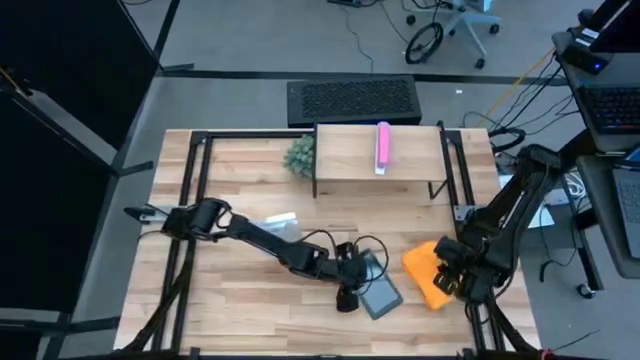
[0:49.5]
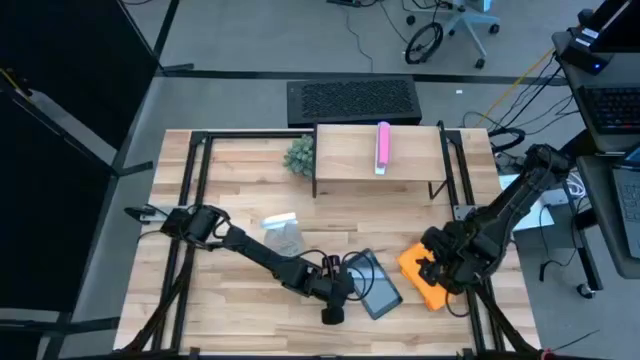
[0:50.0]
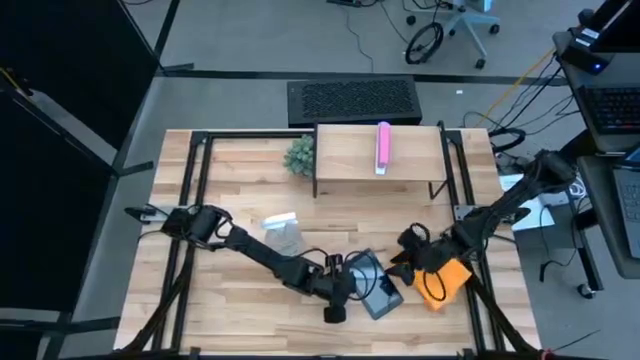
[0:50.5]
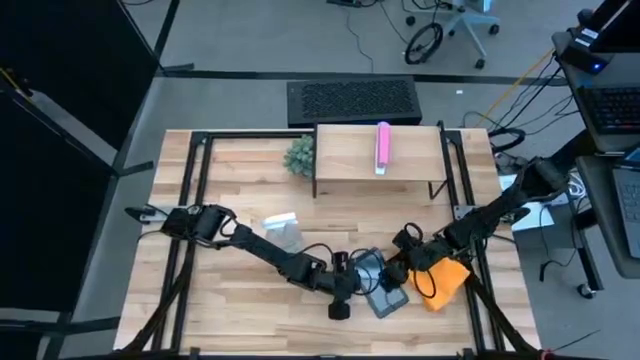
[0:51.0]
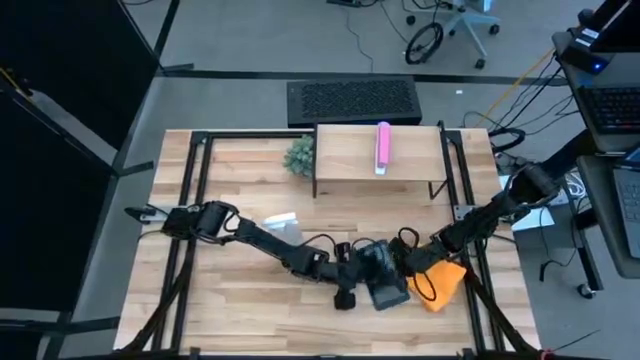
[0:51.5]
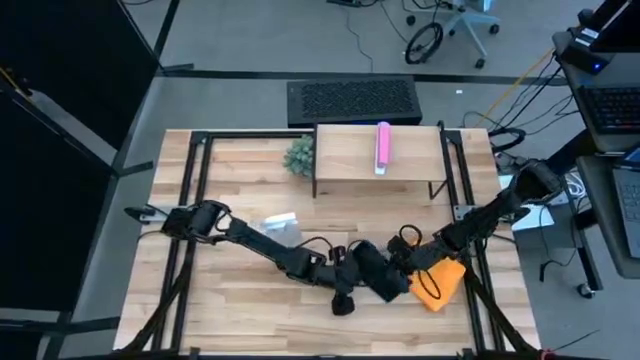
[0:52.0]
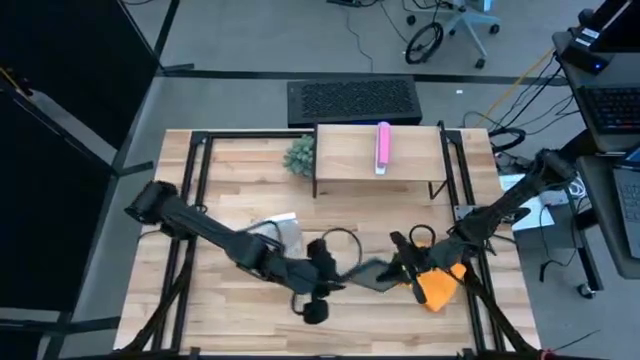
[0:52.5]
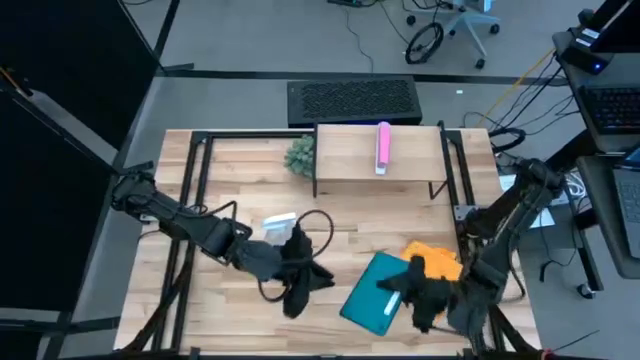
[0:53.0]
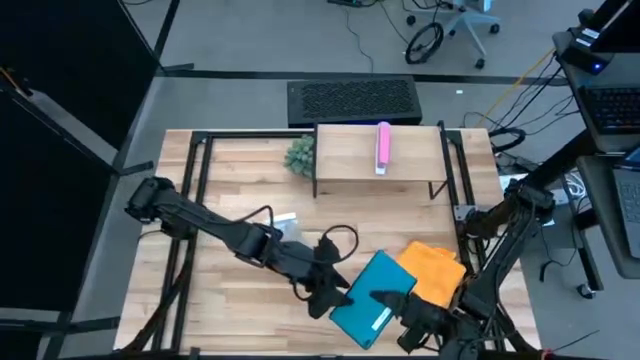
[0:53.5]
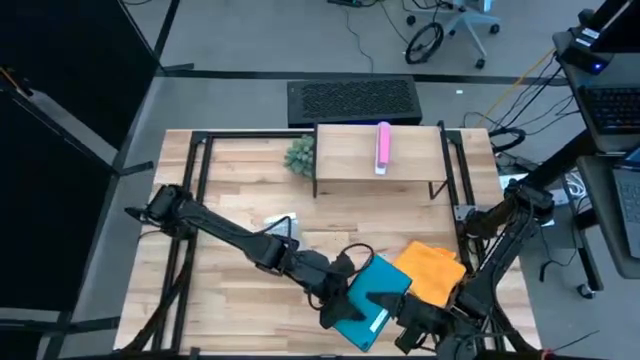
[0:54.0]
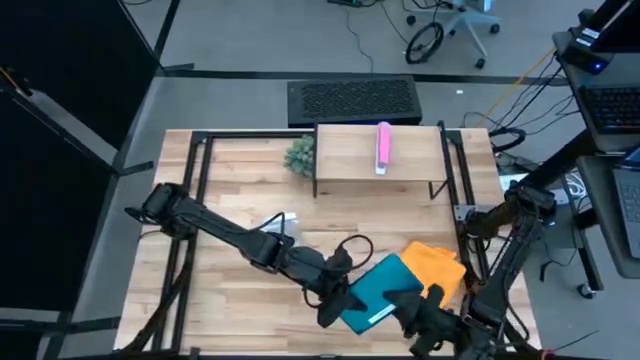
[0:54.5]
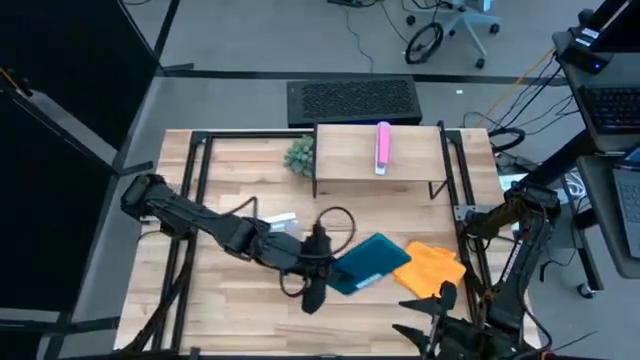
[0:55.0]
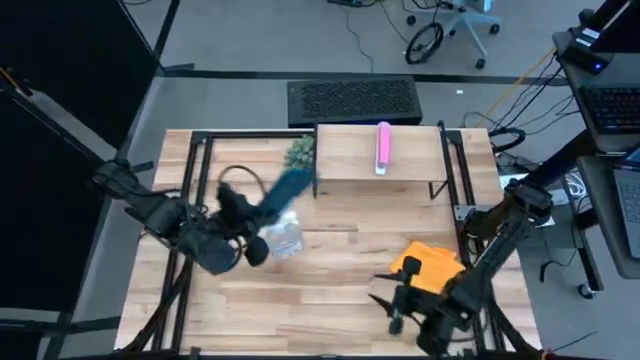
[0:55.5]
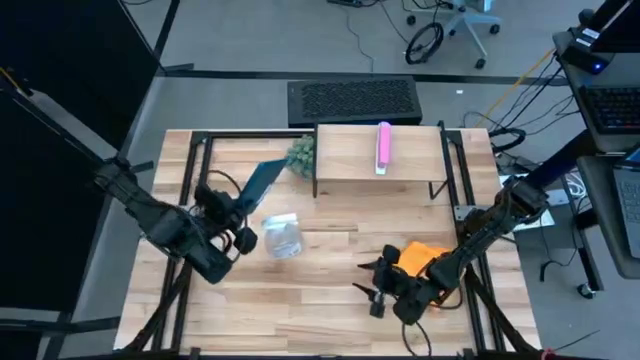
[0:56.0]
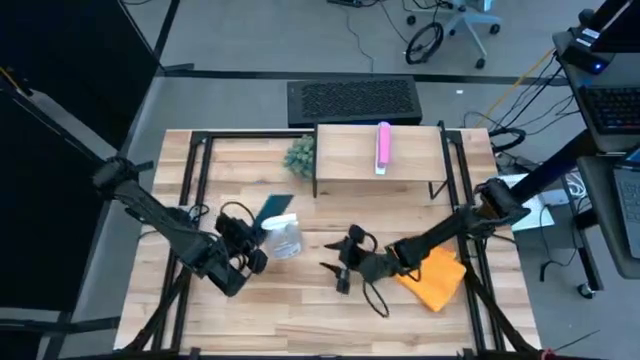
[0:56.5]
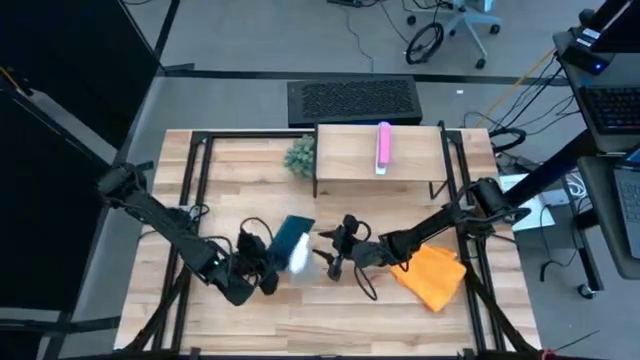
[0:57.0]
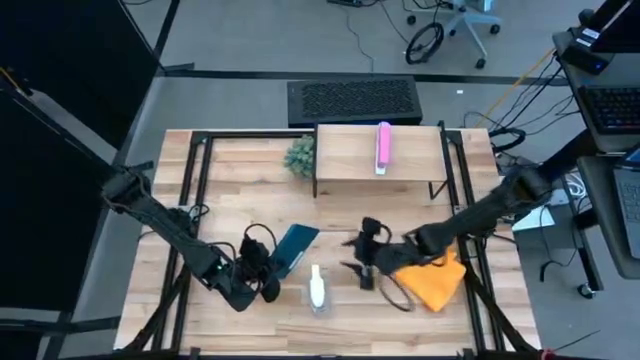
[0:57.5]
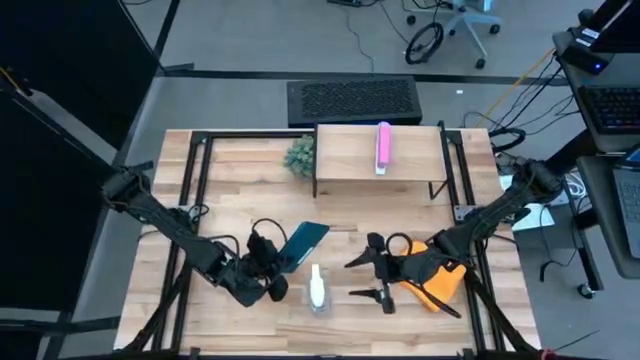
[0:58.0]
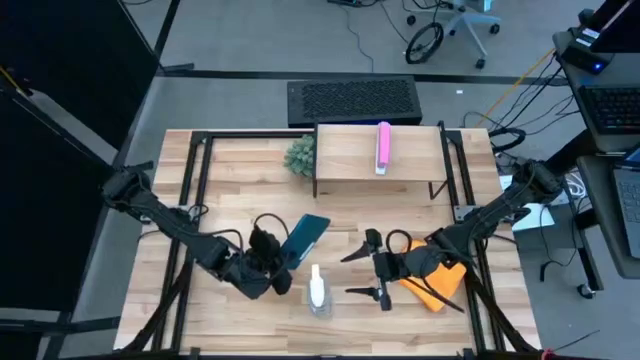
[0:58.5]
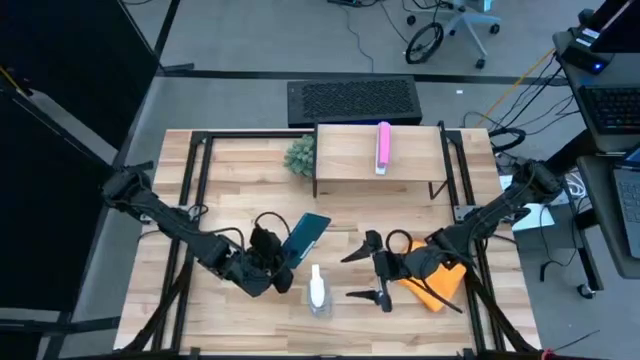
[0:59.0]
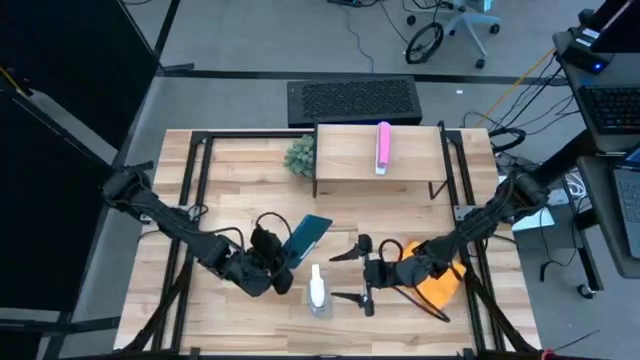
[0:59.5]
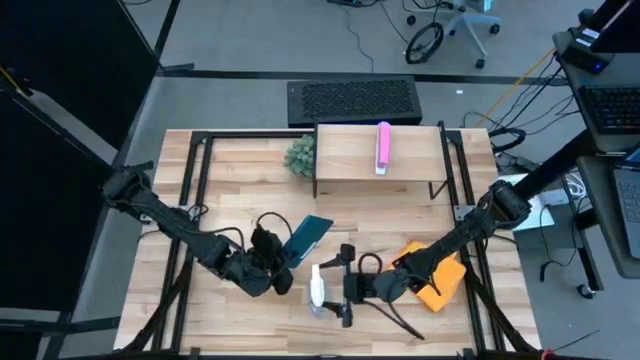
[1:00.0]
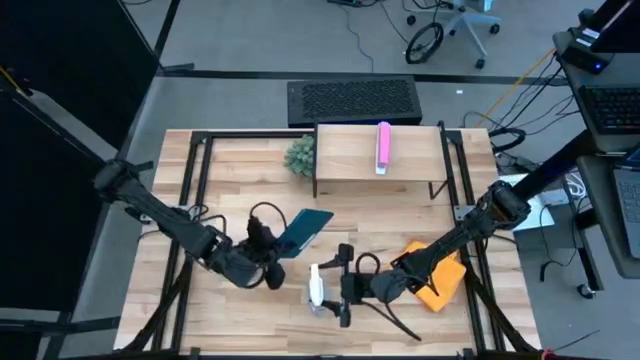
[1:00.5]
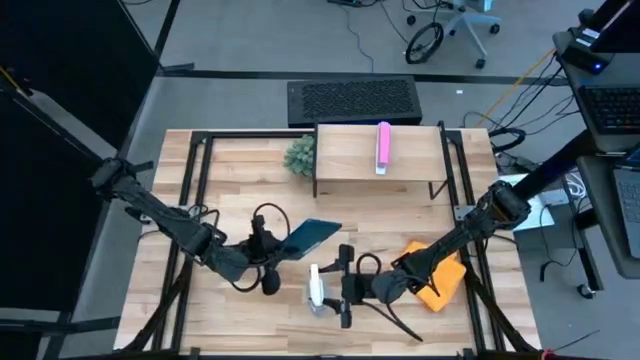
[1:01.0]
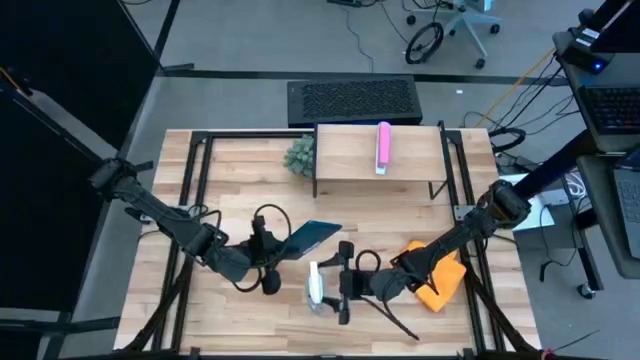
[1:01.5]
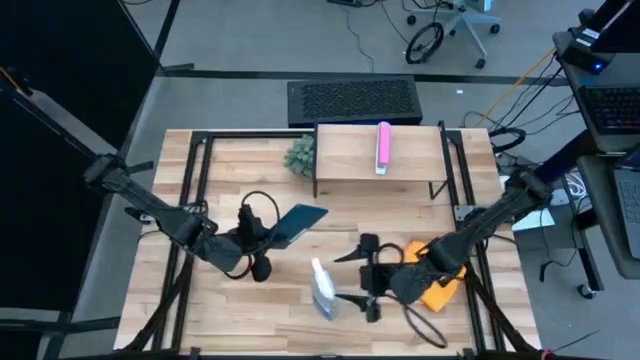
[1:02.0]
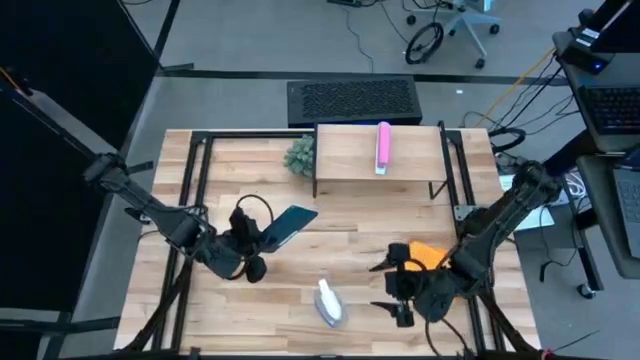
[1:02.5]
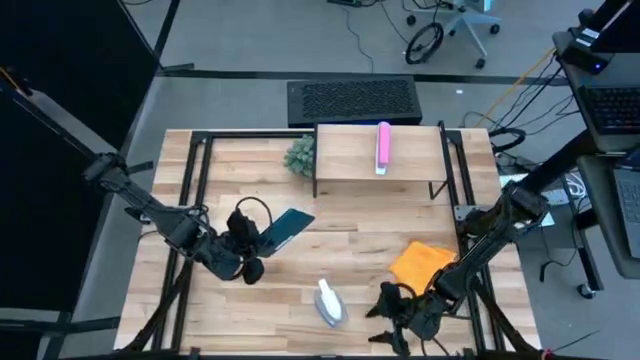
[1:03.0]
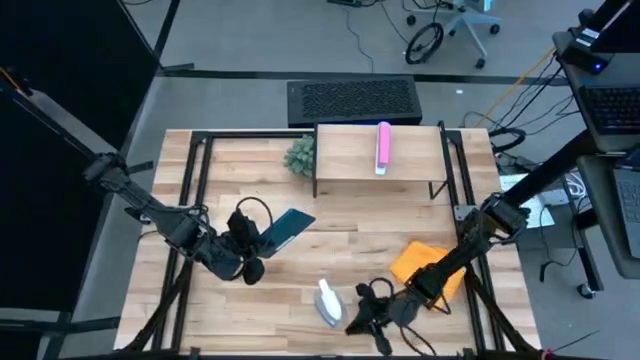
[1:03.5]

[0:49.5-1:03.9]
Task: Apply microfiber cloth
Spray the tablet with the bottle cleaner

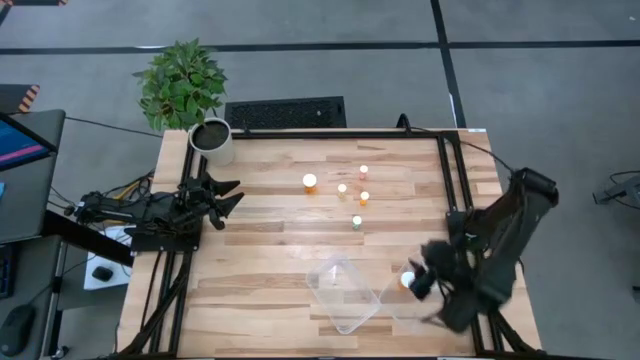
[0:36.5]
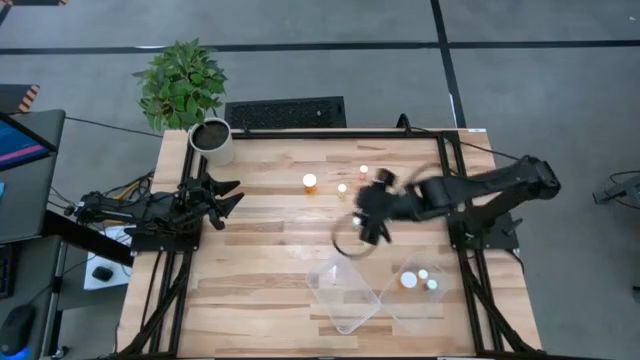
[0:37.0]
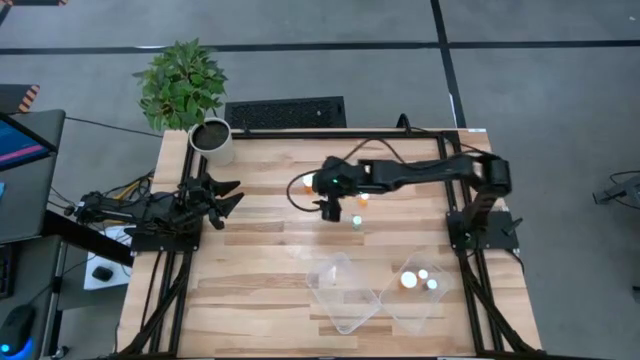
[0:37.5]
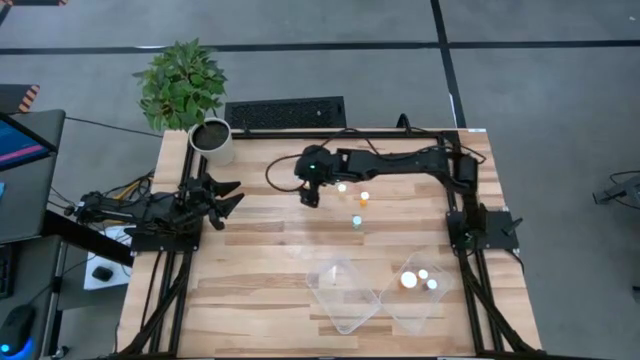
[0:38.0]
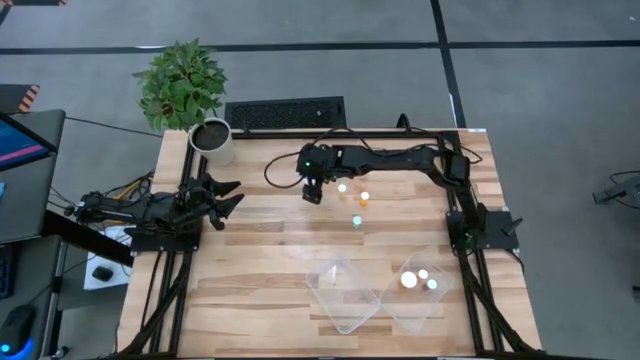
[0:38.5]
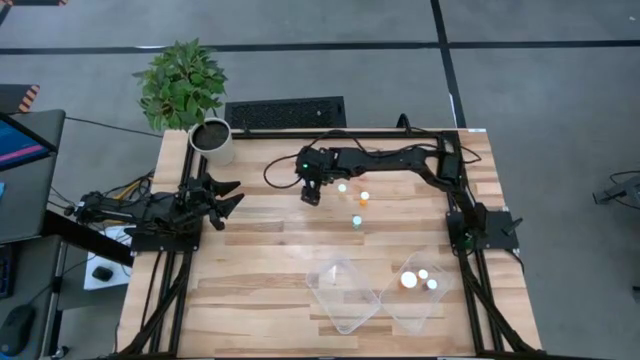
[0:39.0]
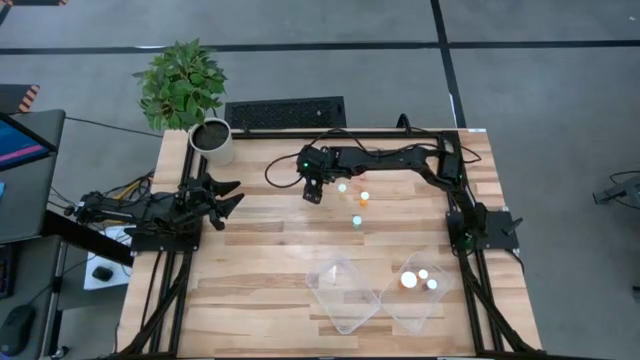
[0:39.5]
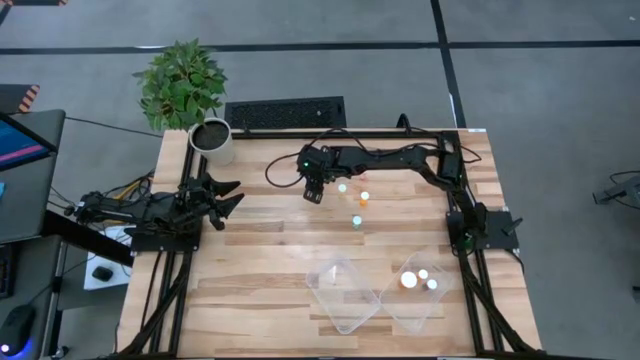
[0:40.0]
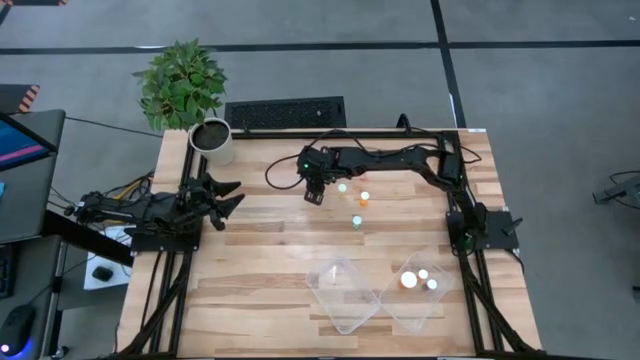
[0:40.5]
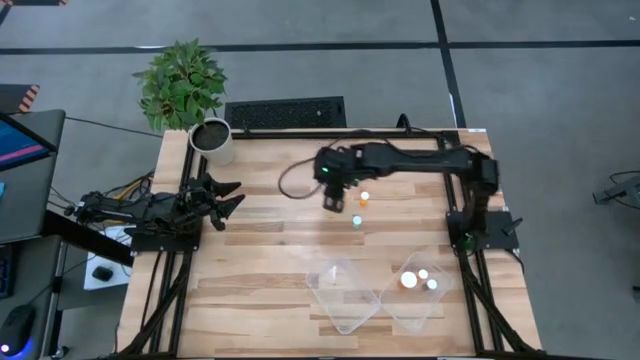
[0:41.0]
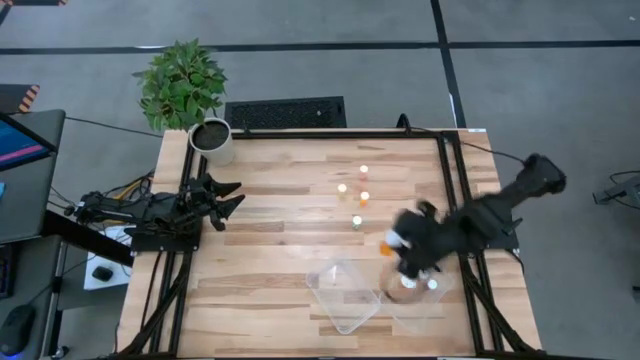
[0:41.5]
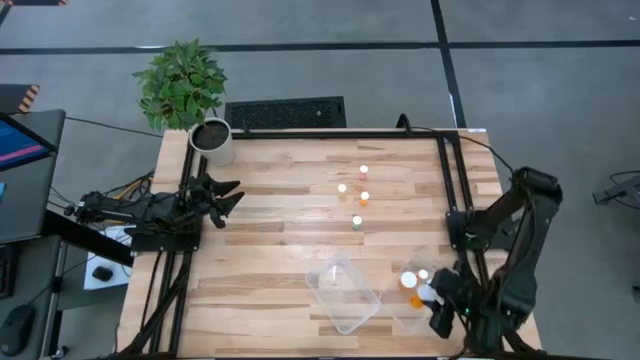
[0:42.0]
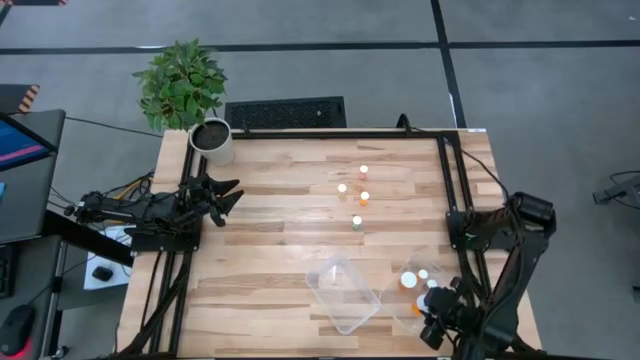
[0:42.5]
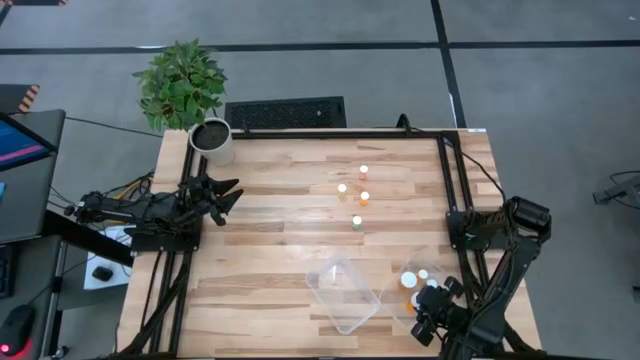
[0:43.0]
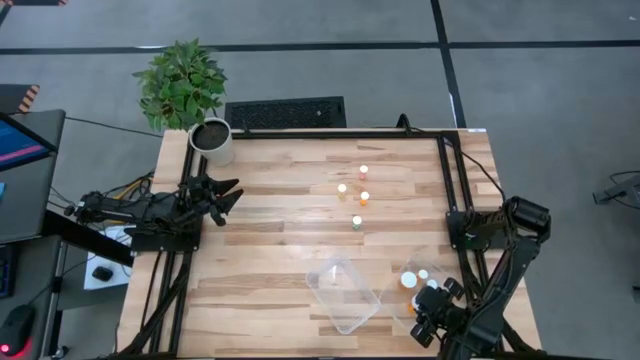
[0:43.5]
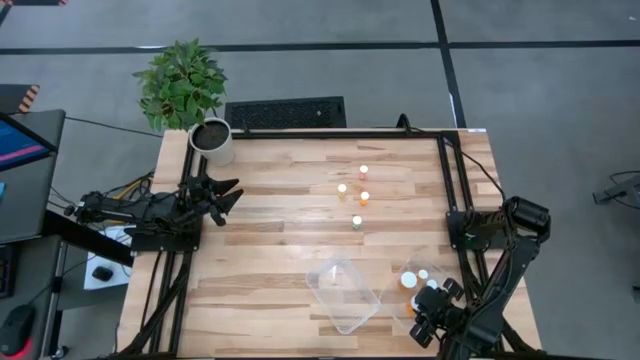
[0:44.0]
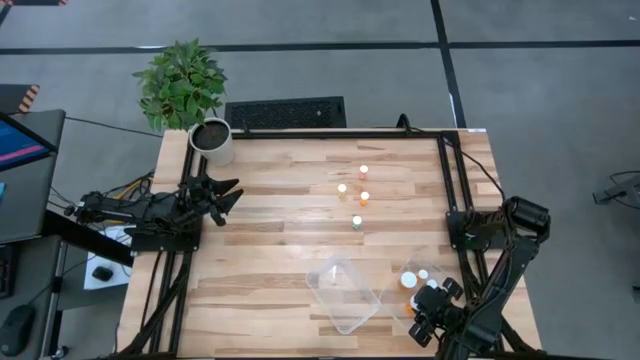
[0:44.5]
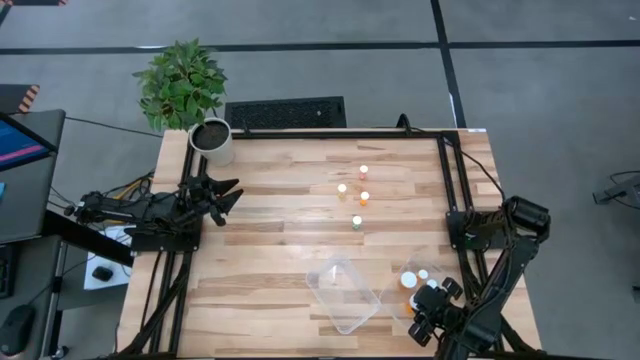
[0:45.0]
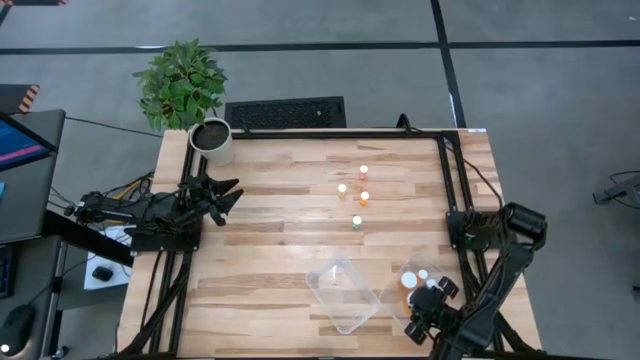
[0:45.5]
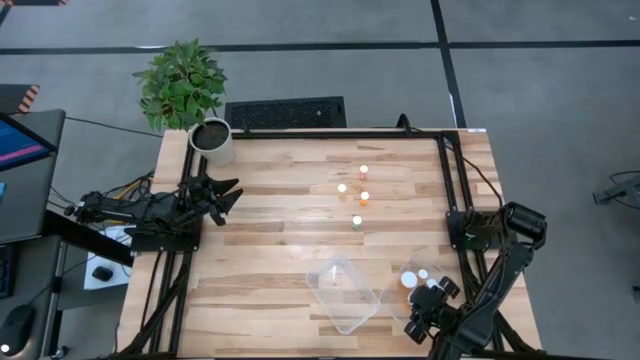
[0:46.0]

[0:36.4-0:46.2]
Task: Pick and place medicine bottles into bin by pill shape (circle, oval)
Put the right orange pill bottle into the right transparent bin
